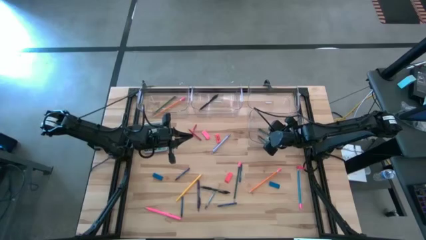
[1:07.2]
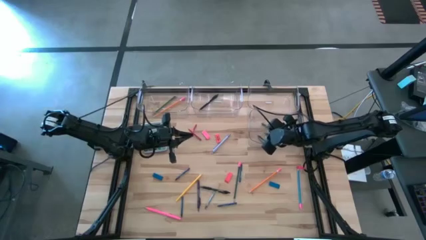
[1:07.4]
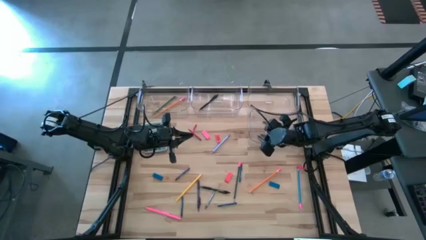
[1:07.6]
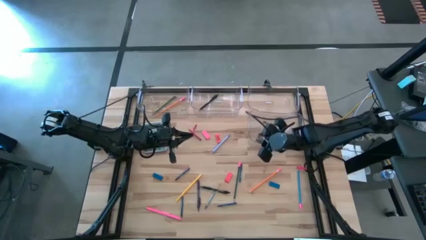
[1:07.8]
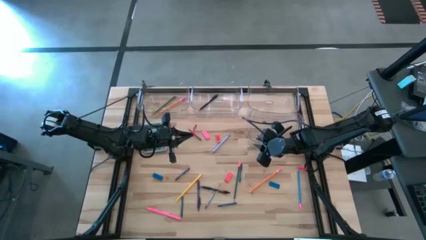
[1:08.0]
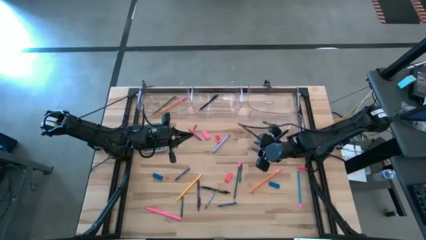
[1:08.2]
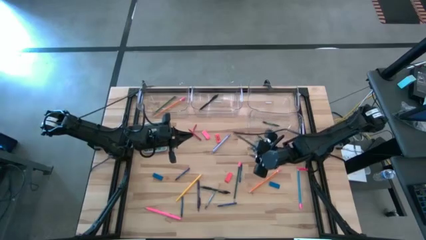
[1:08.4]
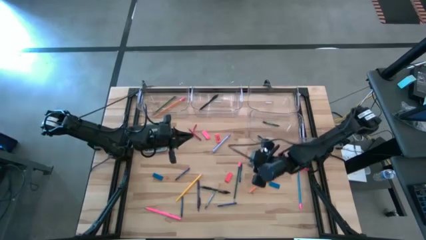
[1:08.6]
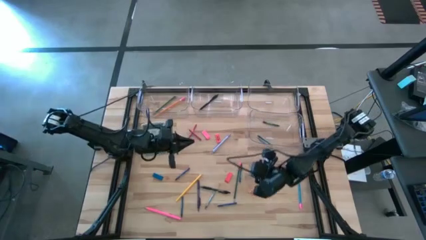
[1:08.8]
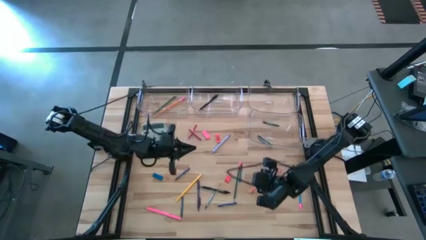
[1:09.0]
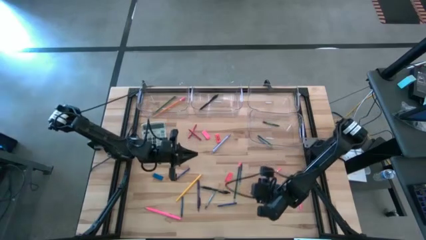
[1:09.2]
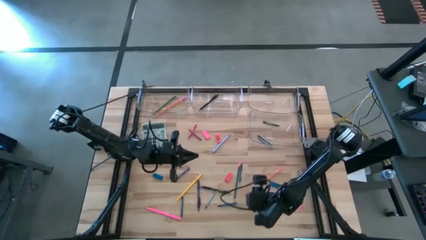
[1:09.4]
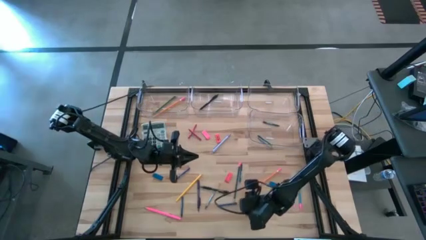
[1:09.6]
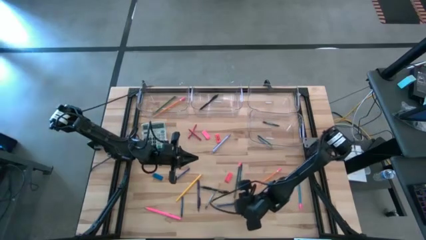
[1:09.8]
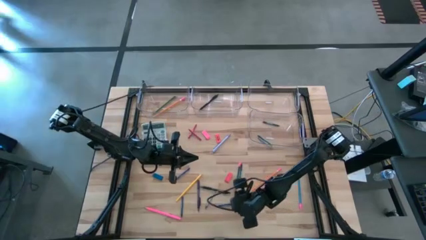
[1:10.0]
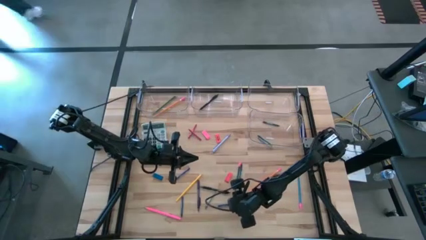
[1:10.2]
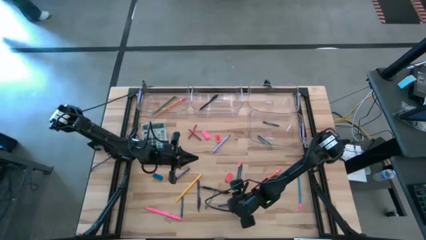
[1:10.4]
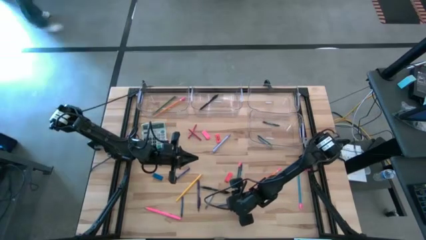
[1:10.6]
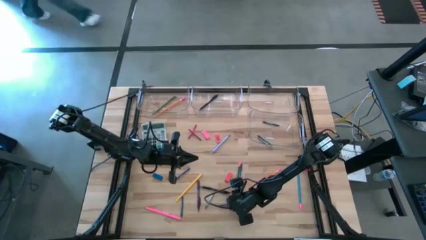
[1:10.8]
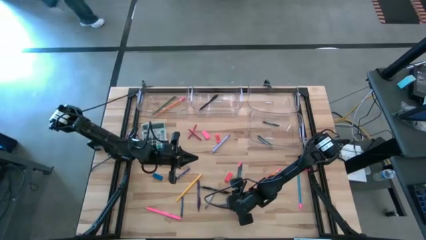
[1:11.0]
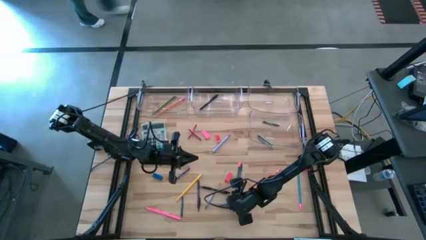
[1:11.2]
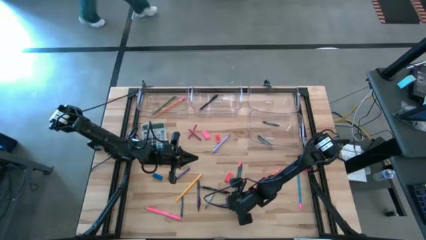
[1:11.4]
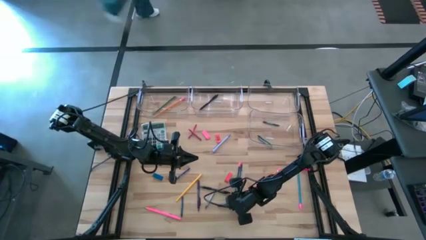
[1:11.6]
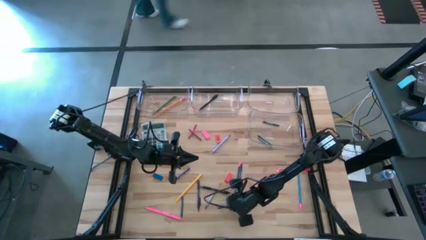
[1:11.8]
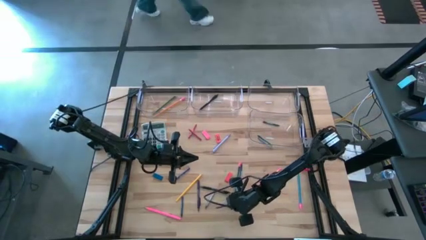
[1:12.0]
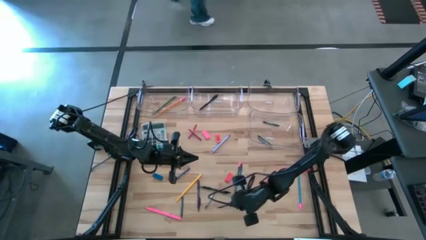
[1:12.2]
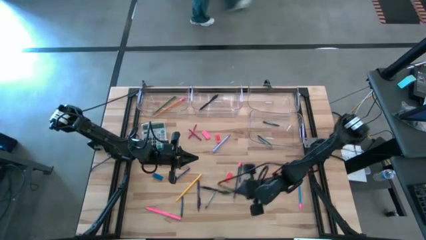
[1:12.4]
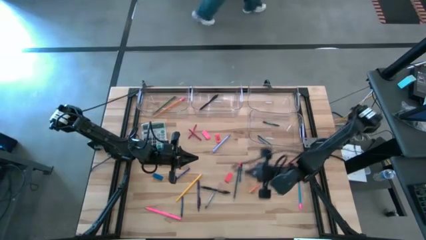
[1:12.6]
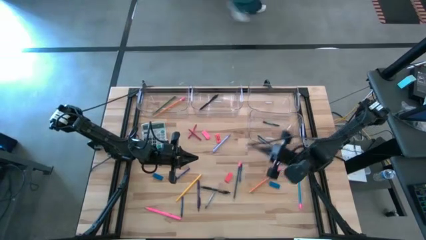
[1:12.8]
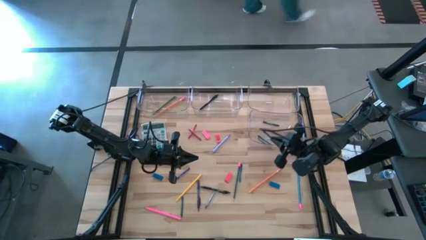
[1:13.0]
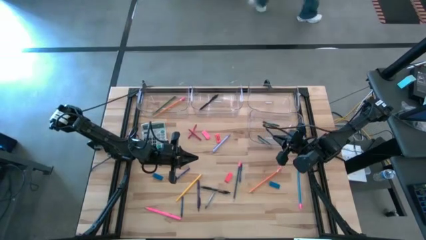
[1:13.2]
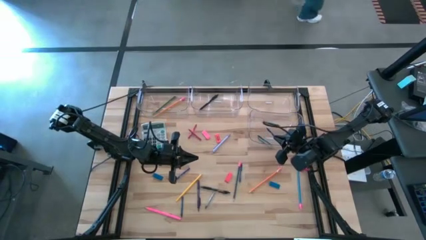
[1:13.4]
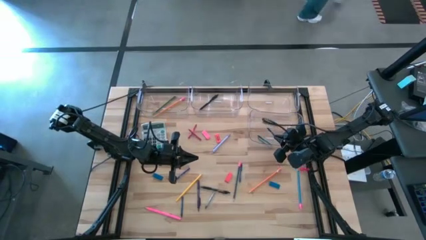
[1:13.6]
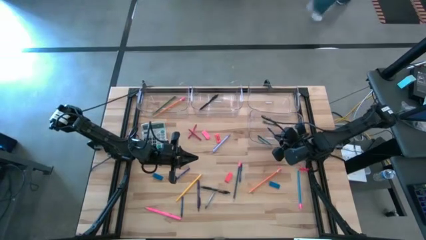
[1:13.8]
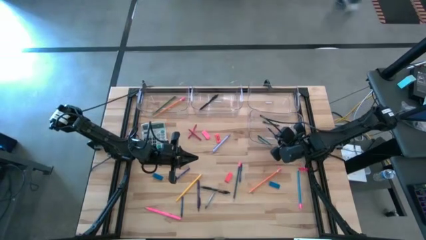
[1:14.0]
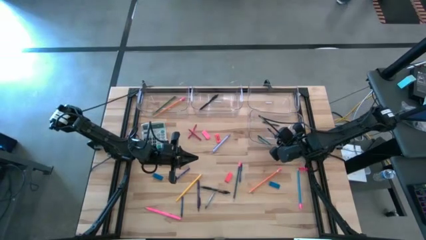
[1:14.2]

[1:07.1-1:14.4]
Task: Sort crayons/erasers/pens/pencils in bins
Put the blue crayon into the bottom transparent bin

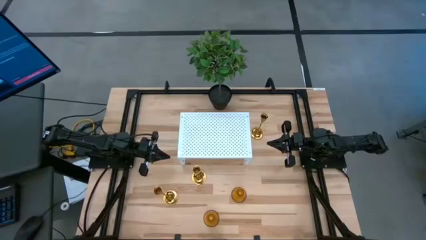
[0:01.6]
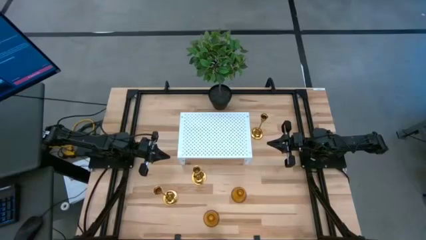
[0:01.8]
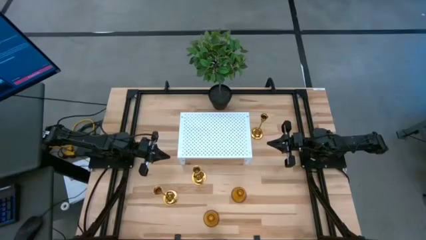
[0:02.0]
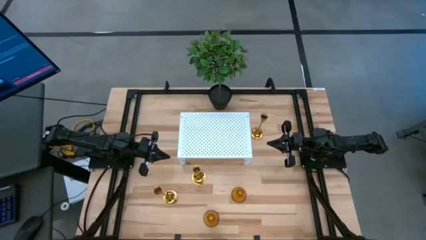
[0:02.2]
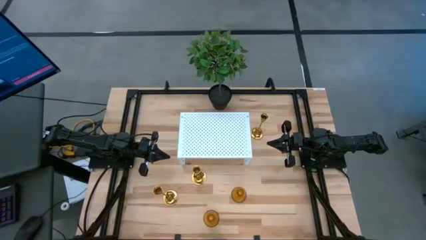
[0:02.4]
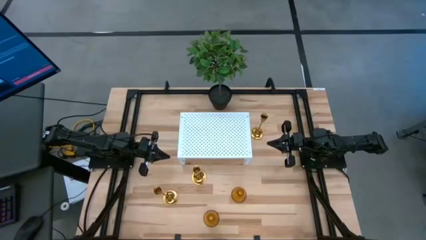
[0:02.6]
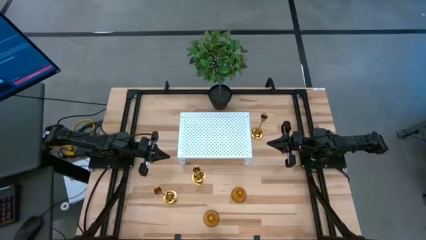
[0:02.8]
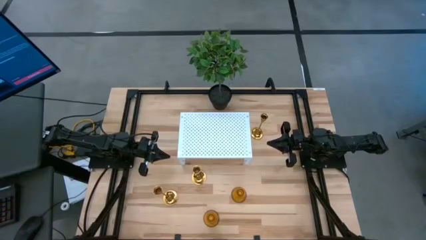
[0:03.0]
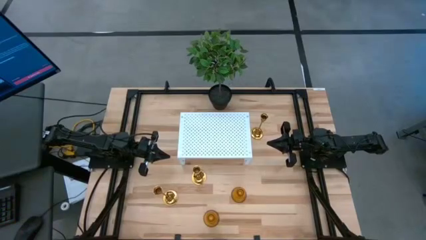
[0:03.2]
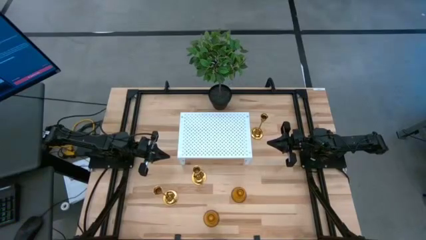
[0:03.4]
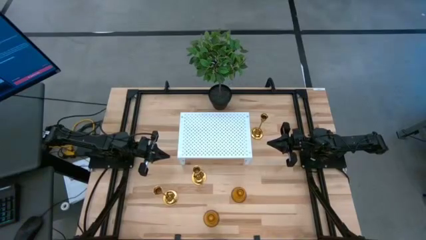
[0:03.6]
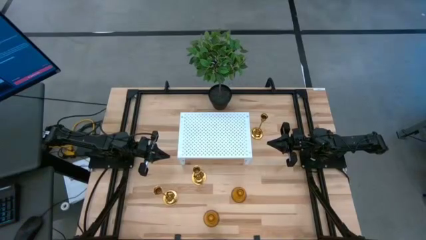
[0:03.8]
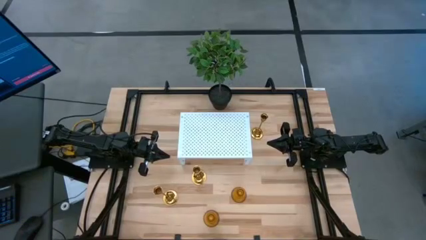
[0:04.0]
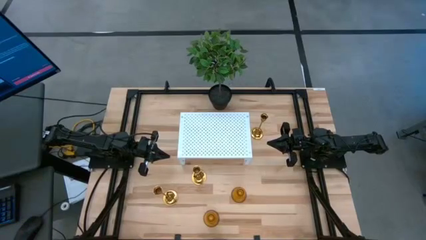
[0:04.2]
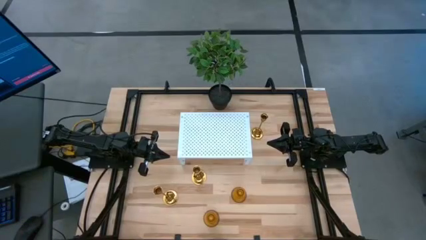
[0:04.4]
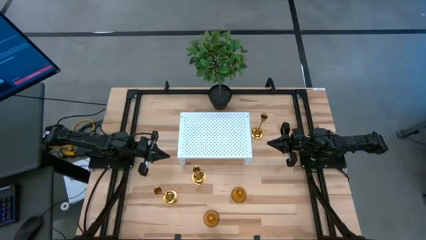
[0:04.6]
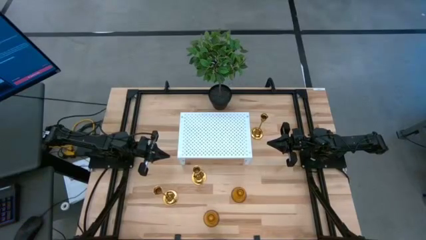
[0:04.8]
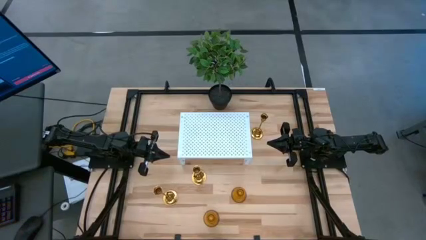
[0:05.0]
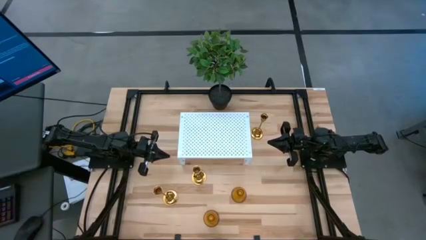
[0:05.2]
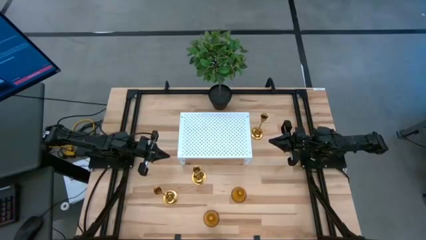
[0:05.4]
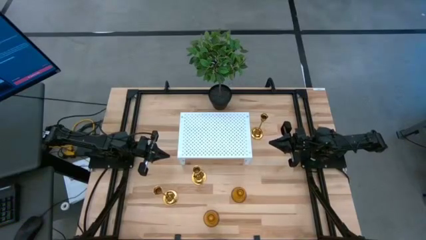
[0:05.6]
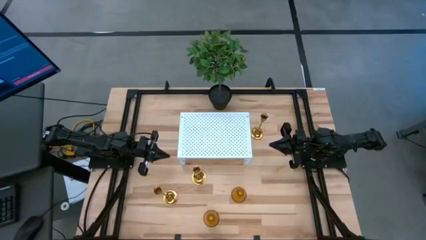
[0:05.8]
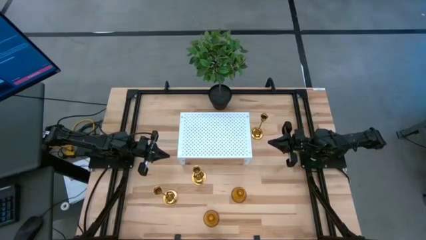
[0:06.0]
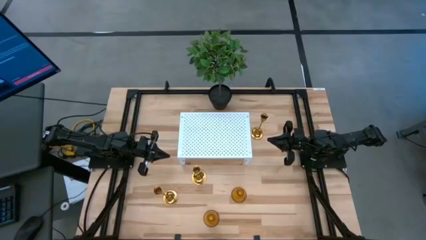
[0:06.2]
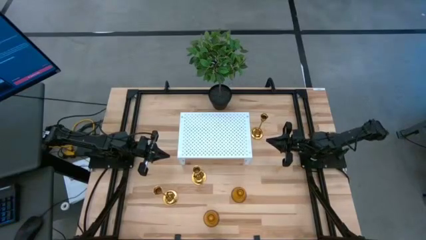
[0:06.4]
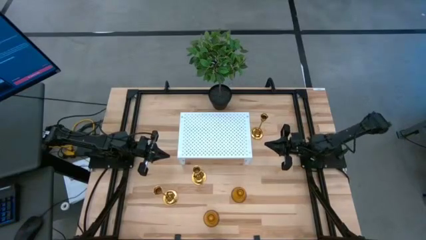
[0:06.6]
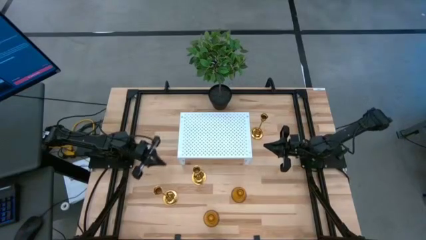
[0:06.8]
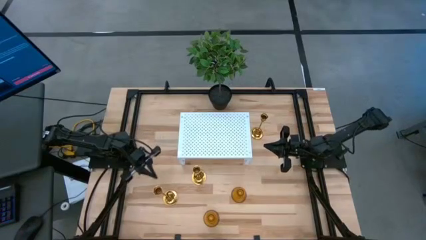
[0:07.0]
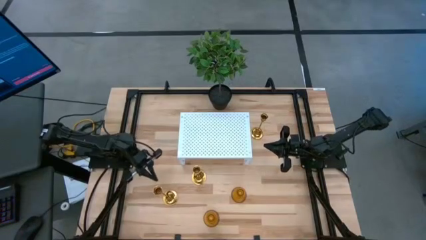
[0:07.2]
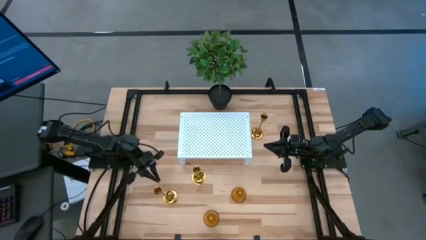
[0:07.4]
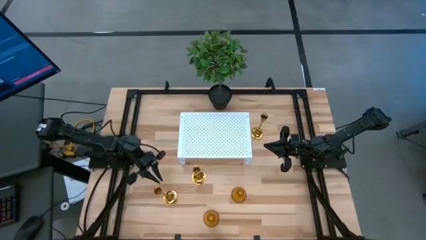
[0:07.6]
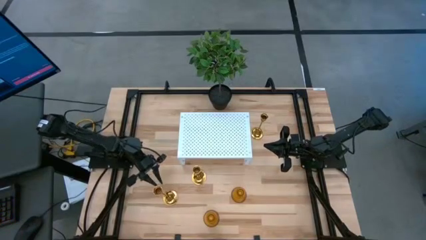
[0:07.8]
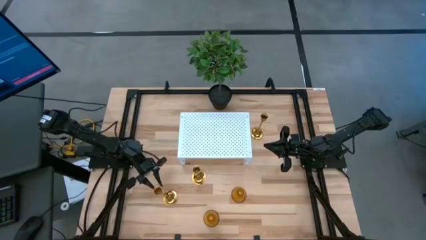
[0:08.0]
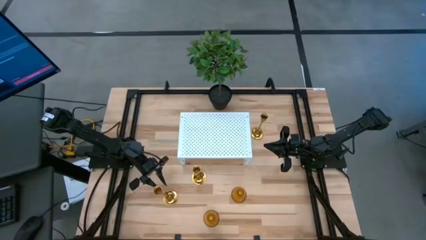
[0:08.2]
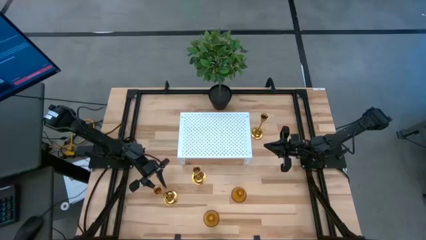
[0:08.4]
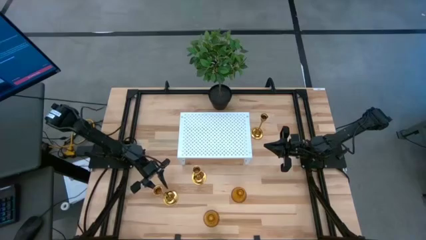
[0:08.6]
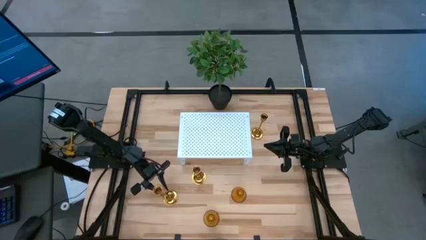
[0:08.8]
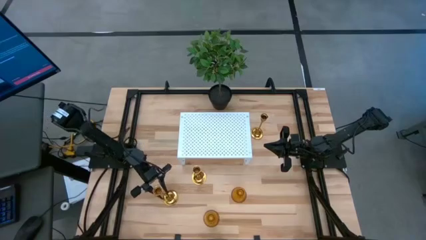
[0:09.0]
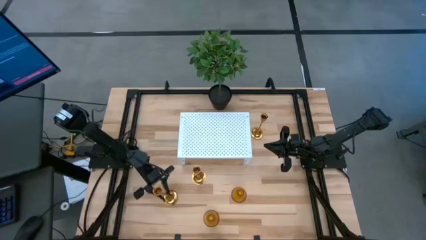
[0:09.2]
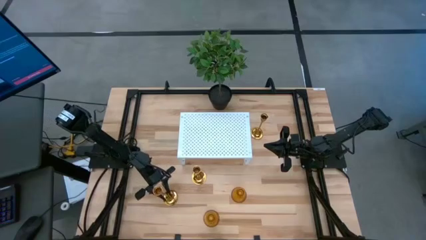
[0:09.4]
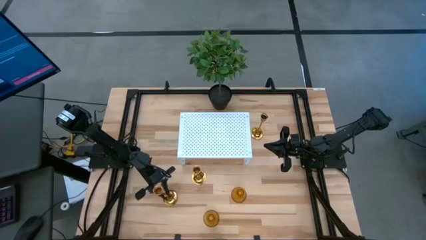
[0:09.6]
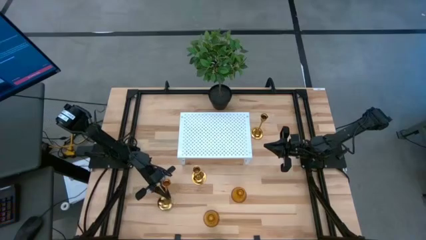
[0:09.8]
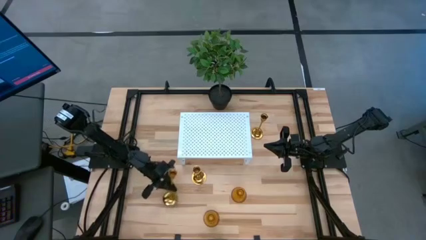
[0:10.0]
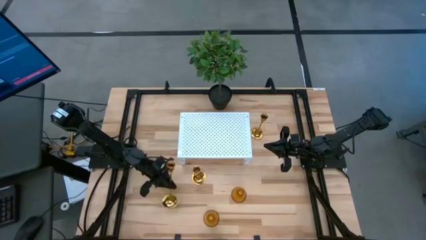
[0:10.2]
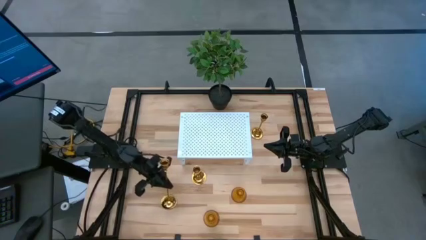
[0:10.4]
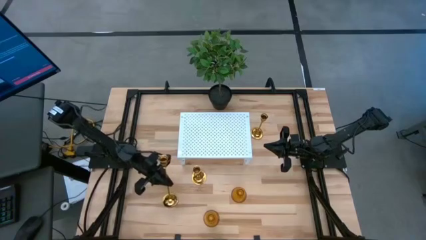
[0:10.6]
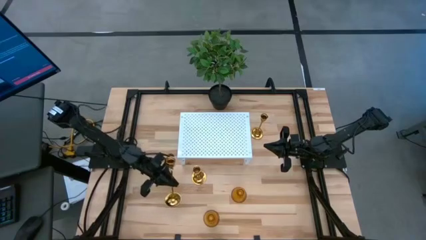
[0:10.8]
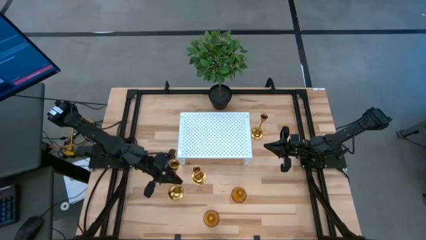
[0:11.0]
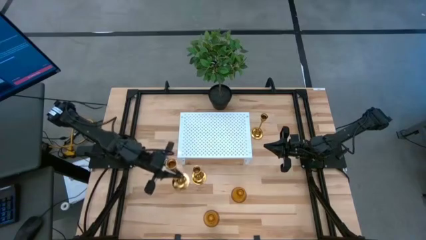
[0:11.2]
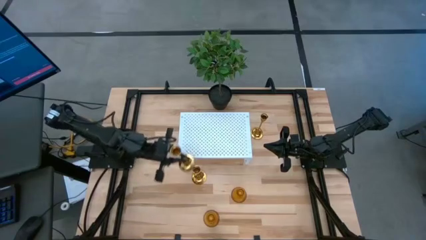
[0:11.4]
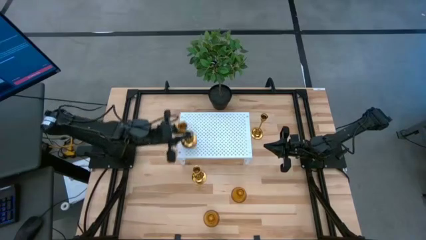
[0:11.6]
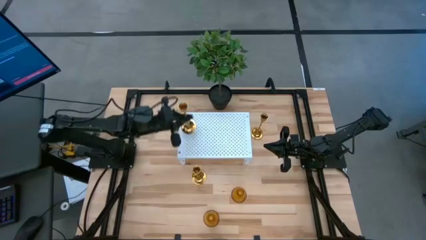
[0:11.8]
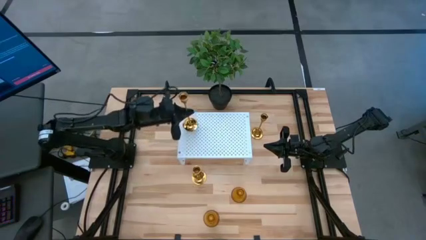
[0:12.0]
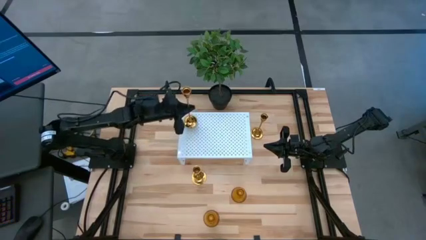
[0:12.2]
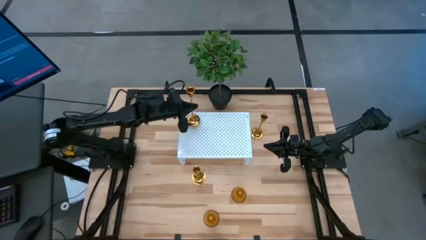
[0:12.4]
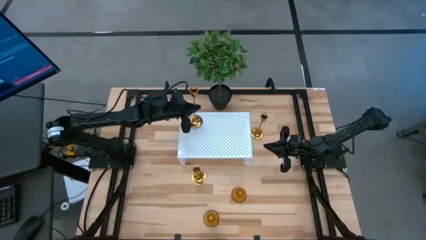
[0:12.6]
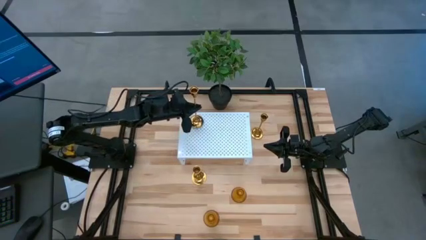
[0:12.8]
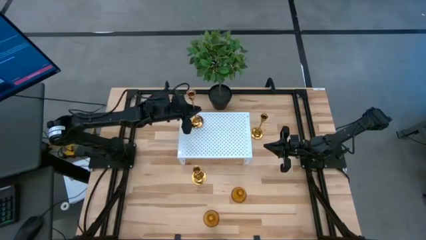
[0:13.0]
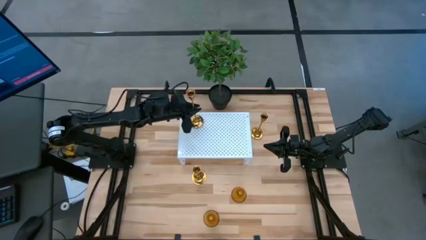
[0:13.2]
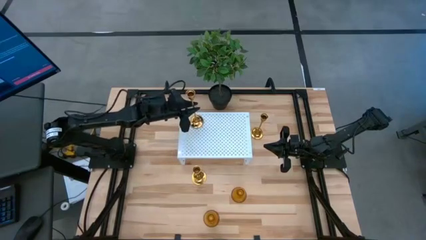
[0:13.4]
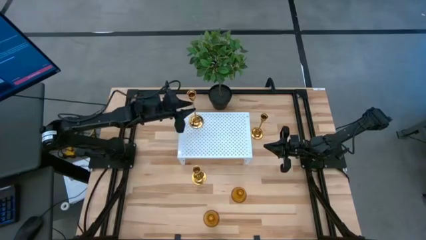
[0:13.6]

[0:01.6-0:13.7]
Task: Pick & Place candle stick holders
Put the bottom left gold candle holder on the shelf
